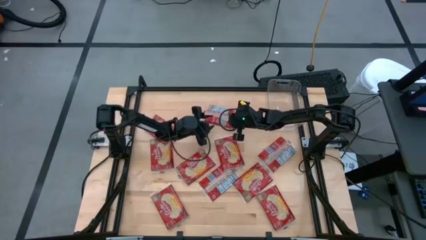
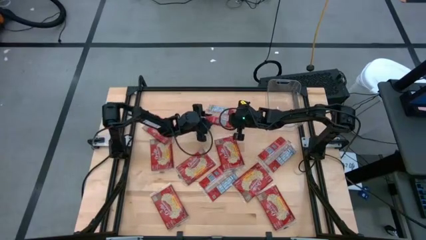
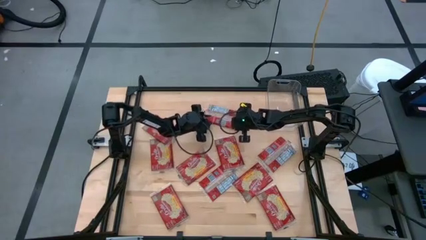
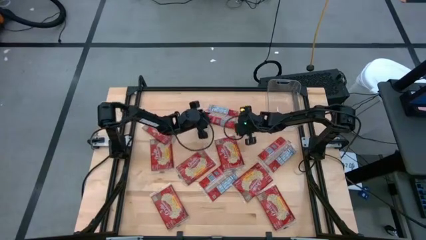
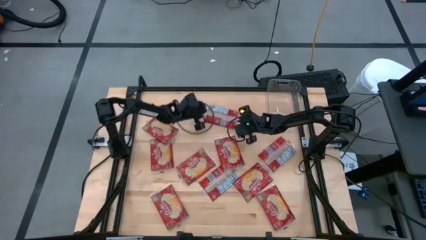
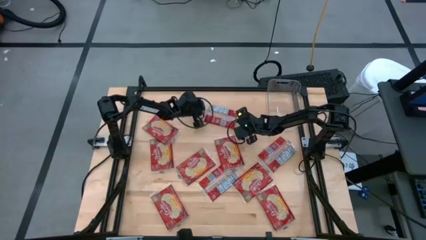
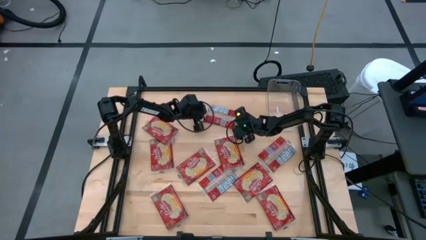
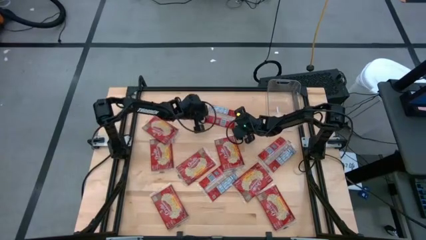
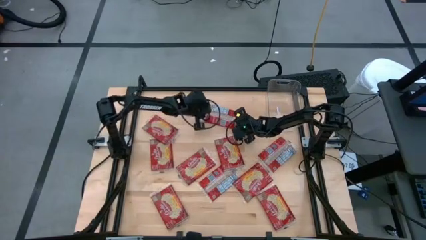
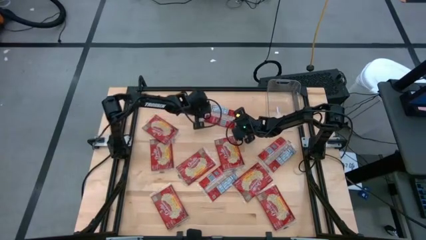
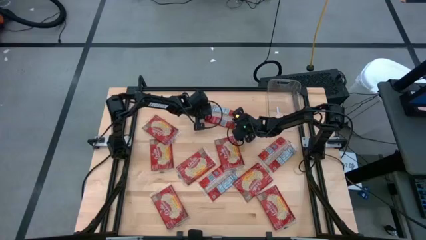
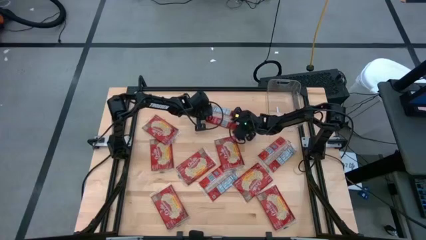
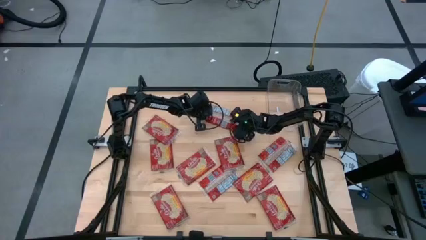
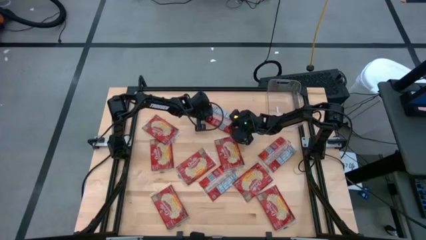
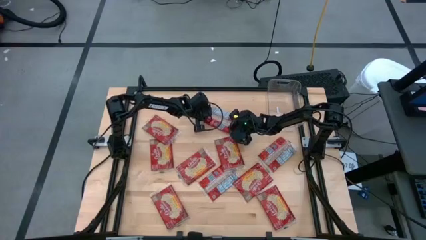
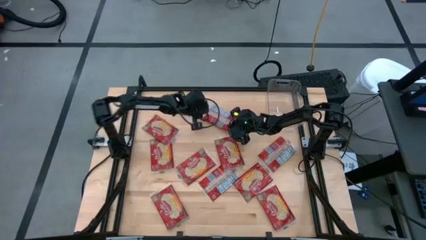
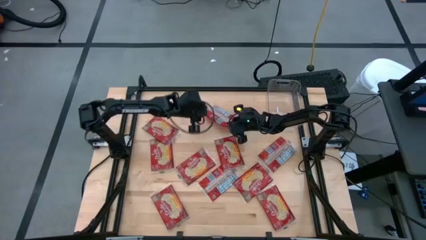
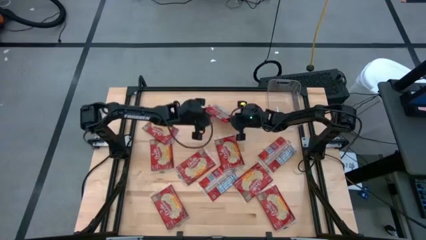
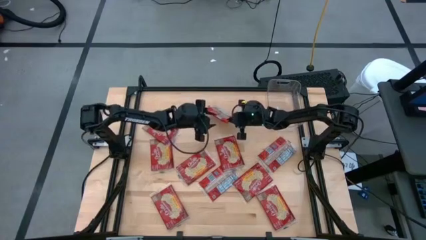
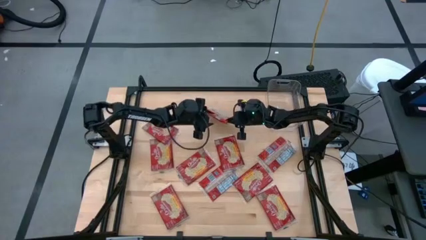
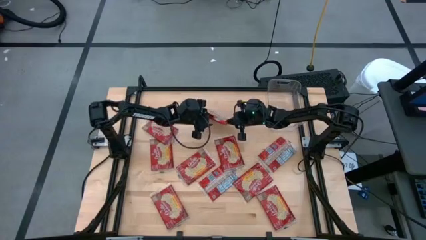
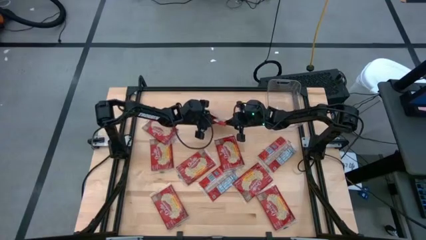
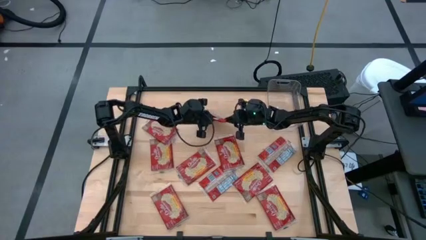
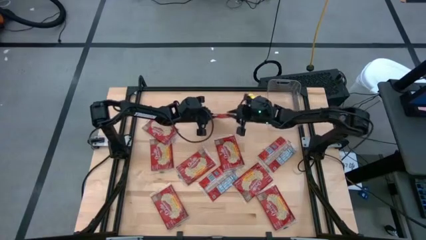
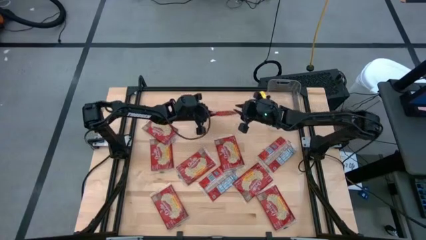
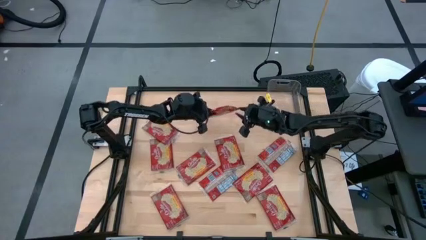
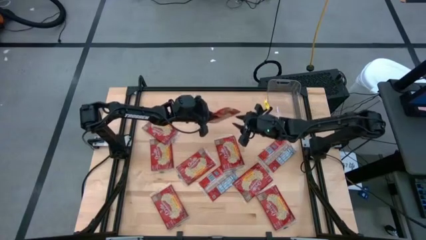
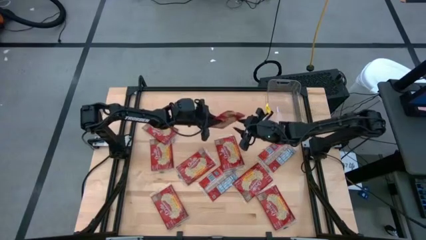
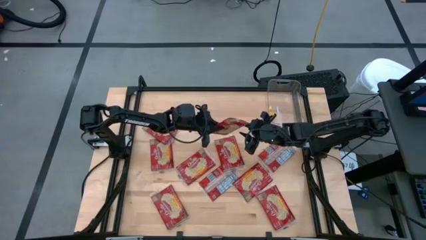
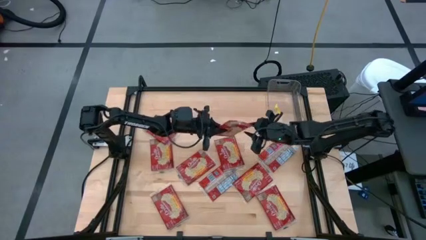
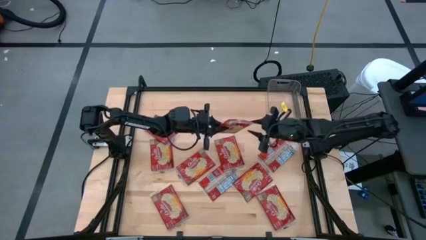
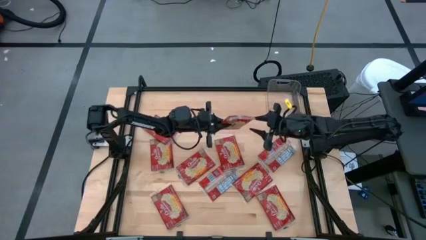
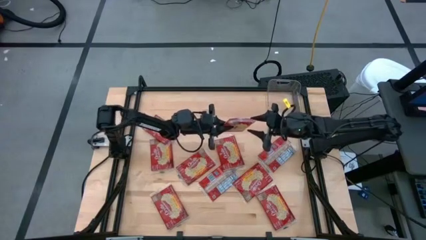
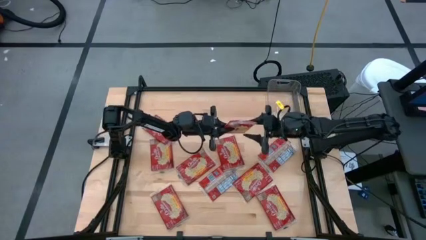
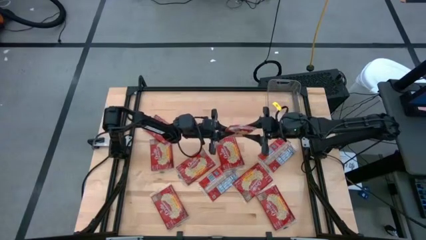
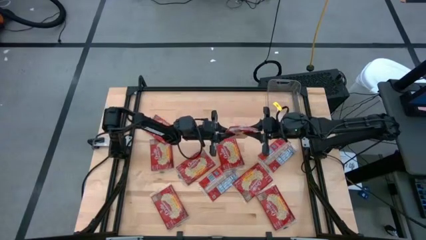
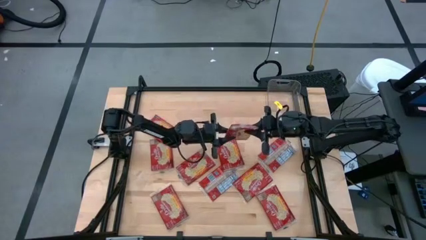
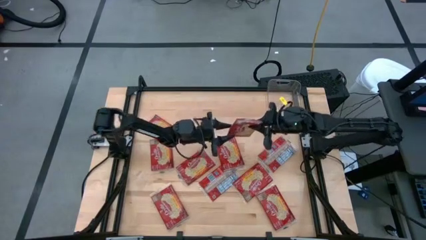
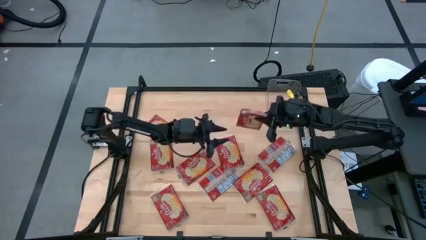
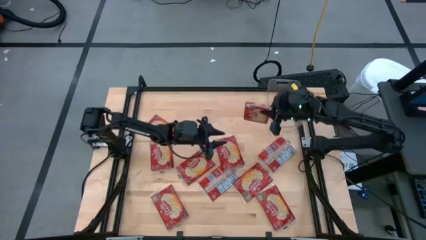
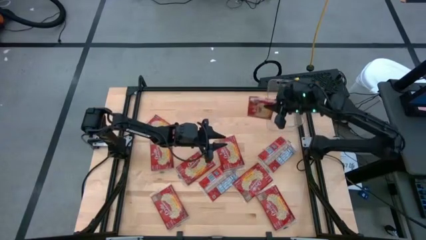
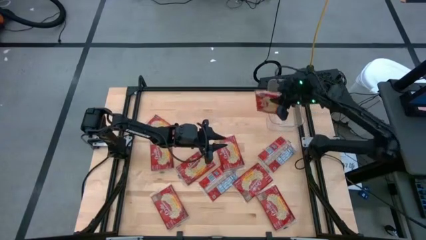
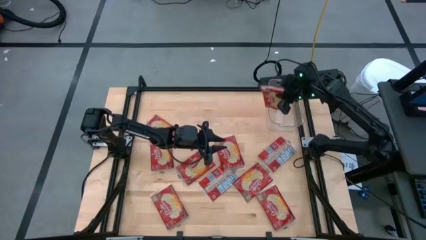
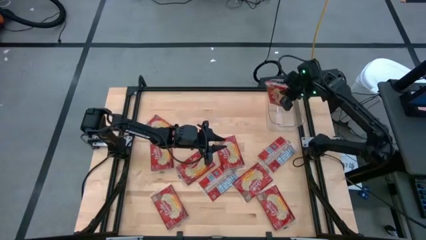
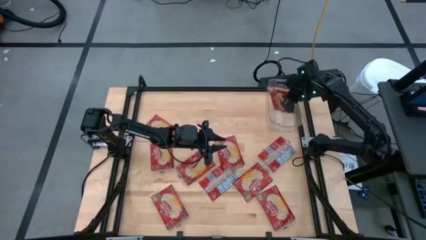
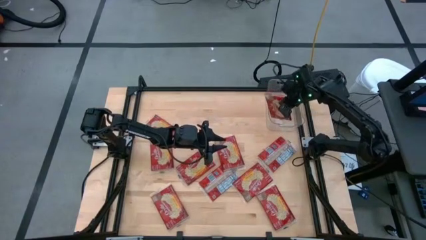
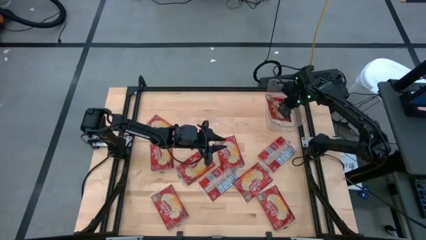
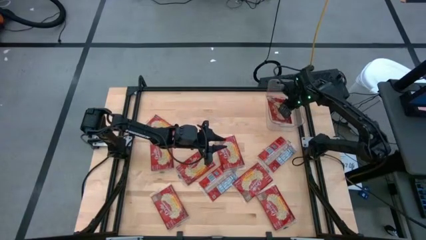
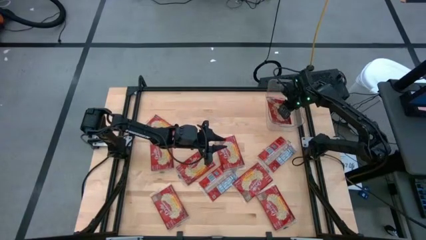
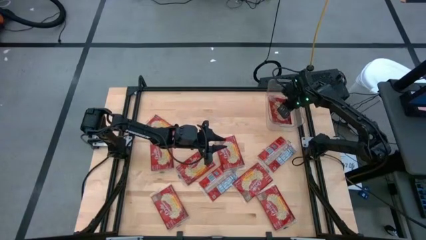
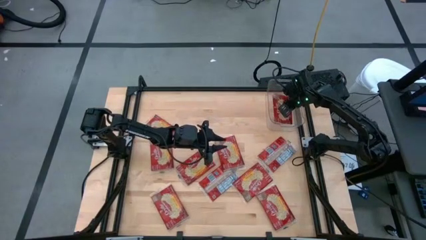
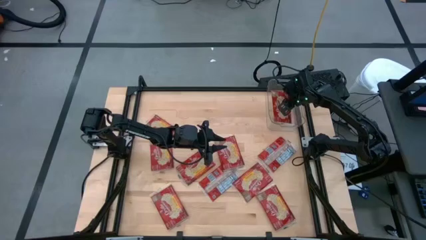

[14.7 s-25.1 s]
Task: Sort popcorn bags into baskets
Put the red popcorn bag into the transparent bin

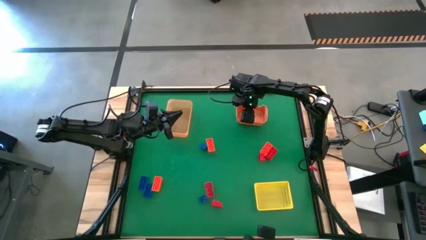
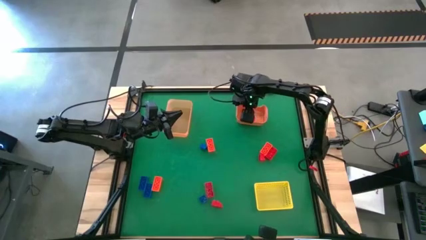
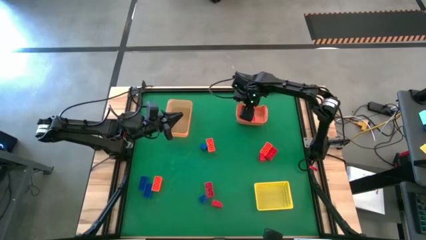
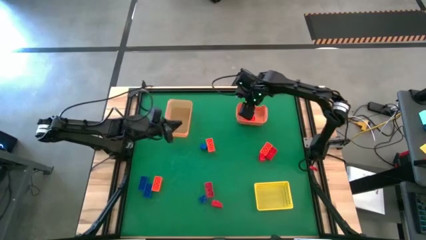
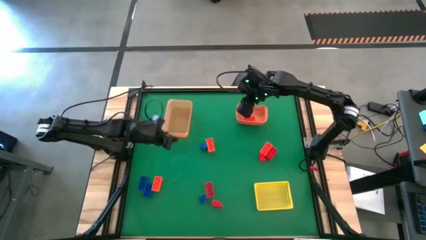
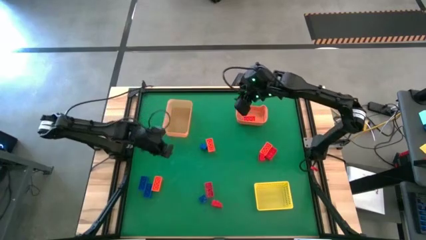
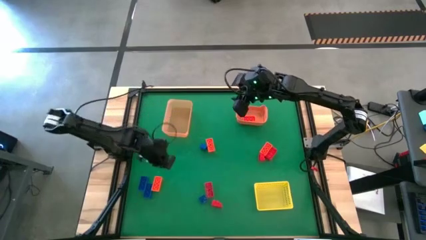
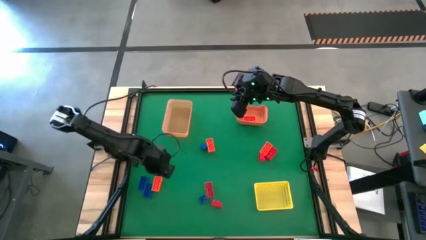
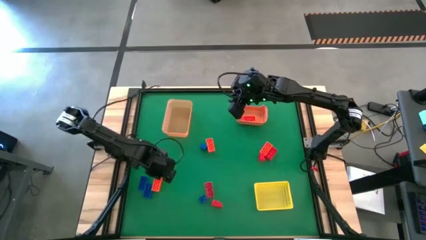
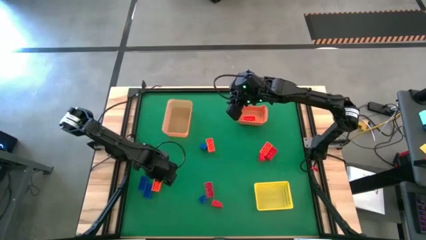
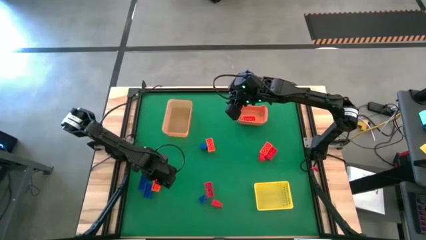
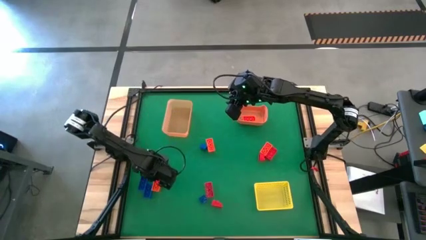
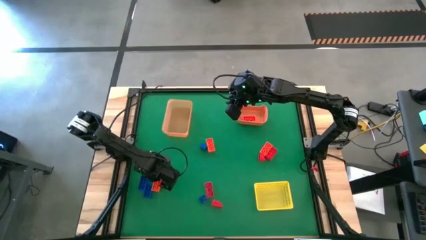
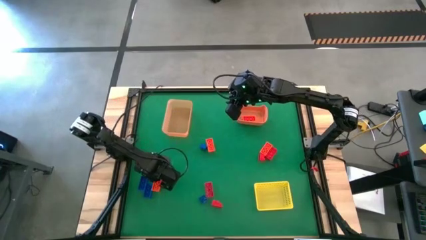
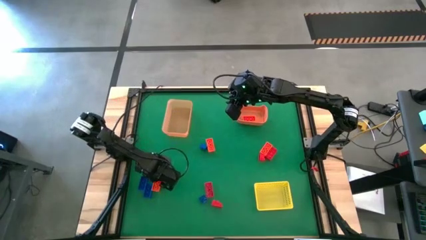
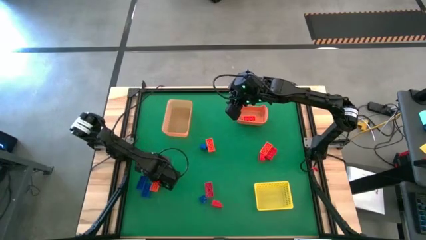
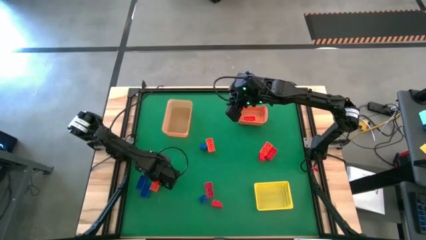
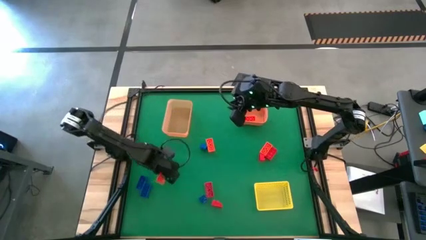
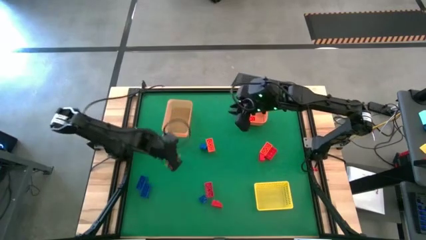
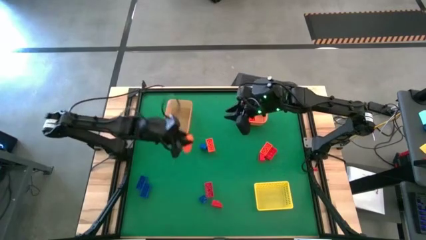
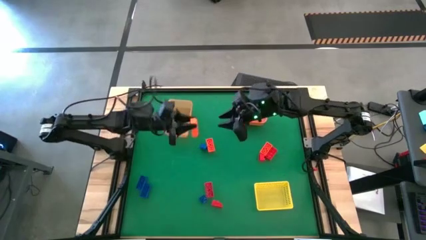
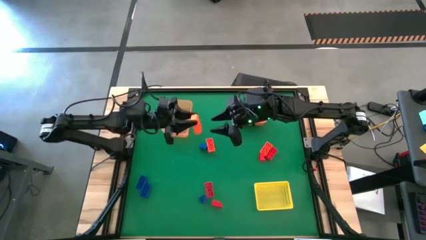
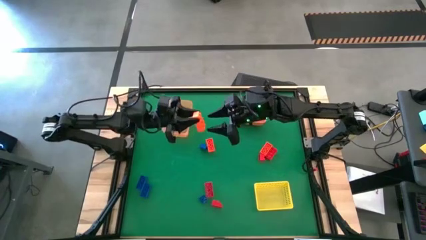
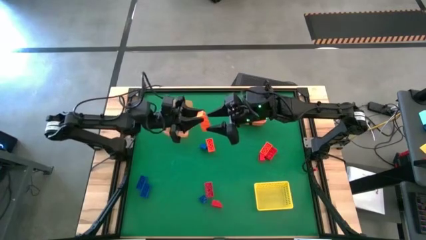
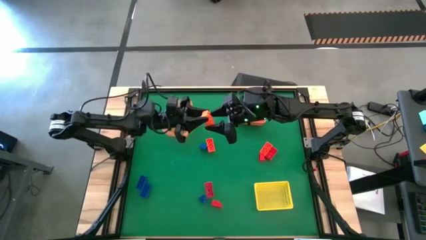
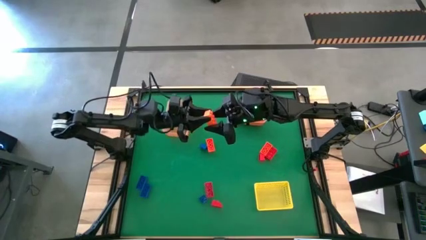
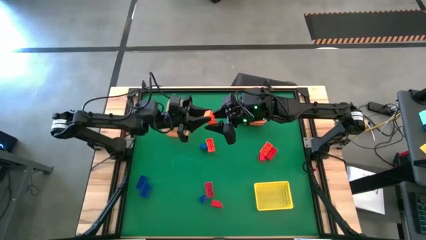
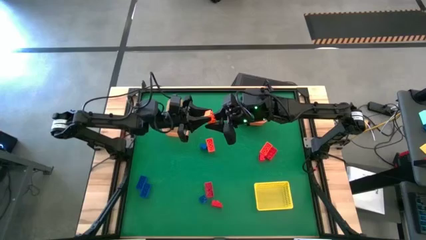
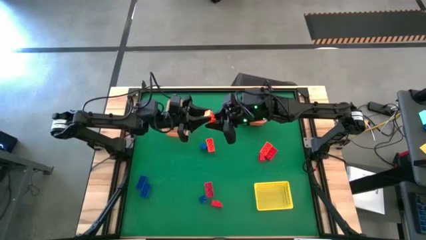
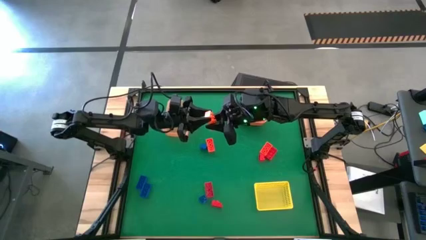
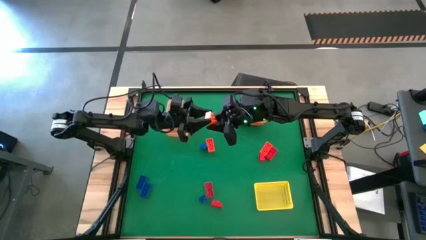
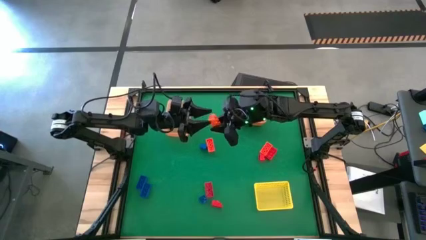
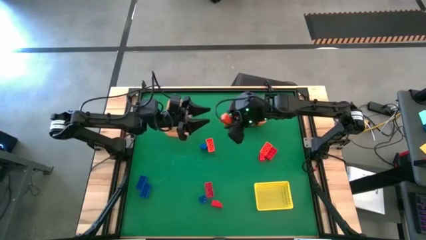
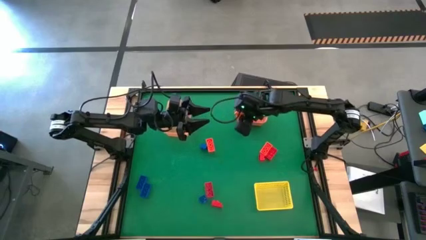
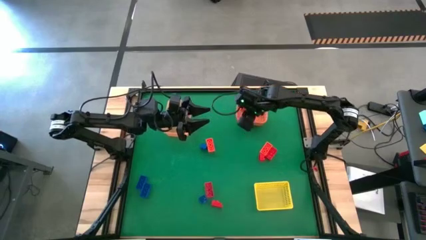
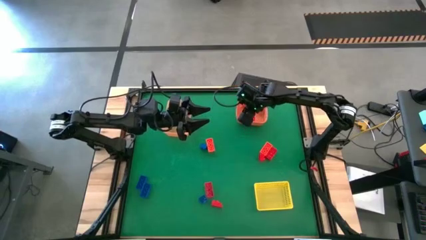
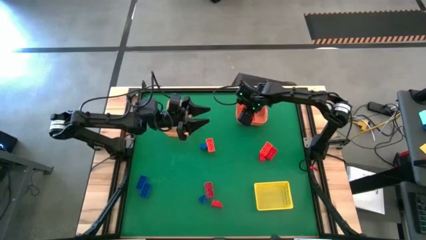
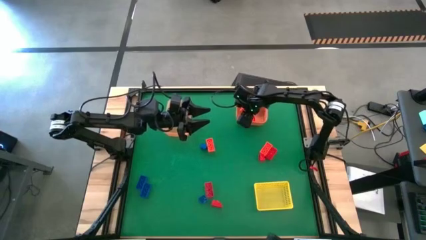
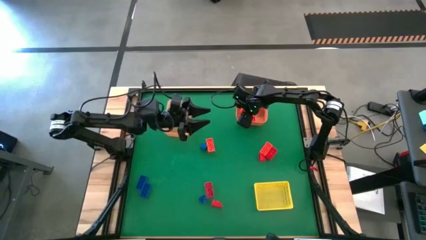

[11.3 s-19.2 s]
Task: Sort & place blocks by color
Put the orange game piece into the right orange bin
